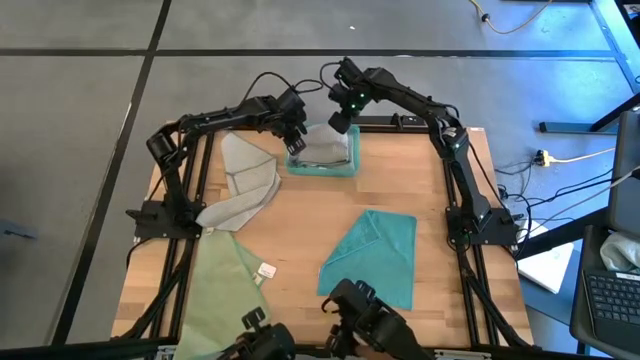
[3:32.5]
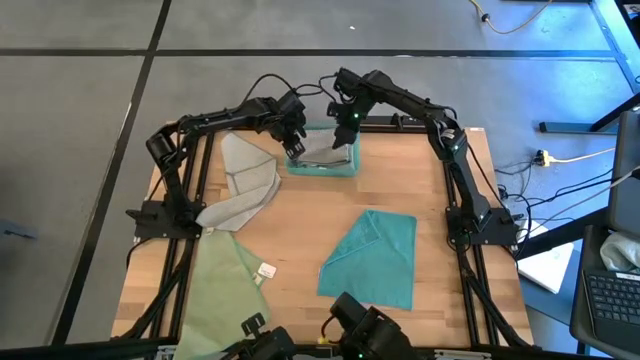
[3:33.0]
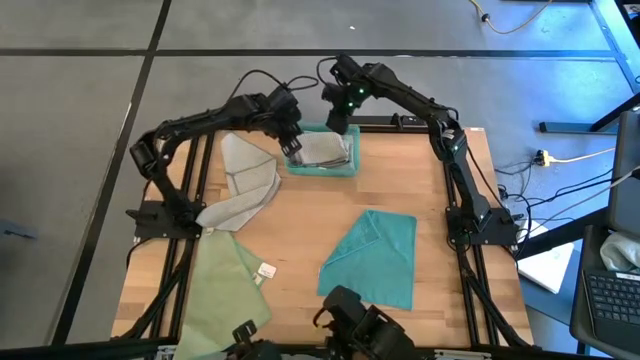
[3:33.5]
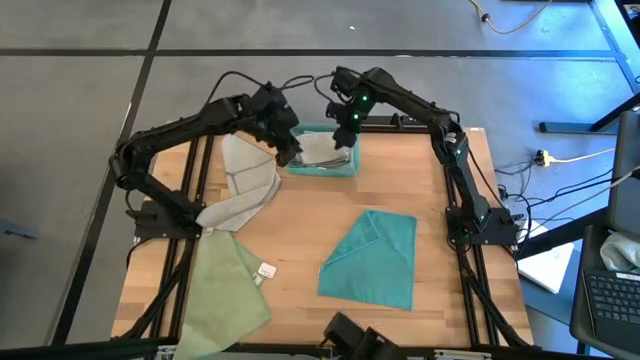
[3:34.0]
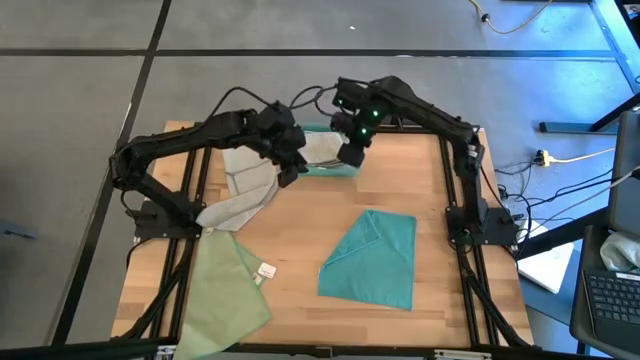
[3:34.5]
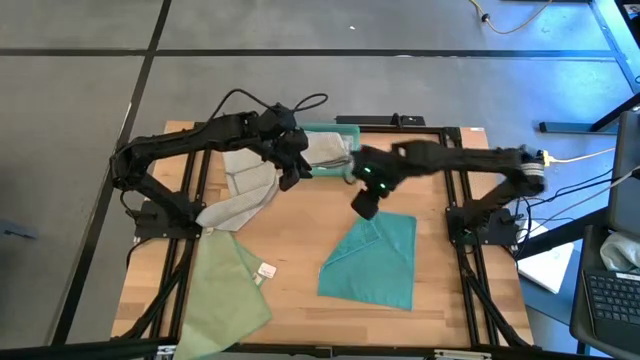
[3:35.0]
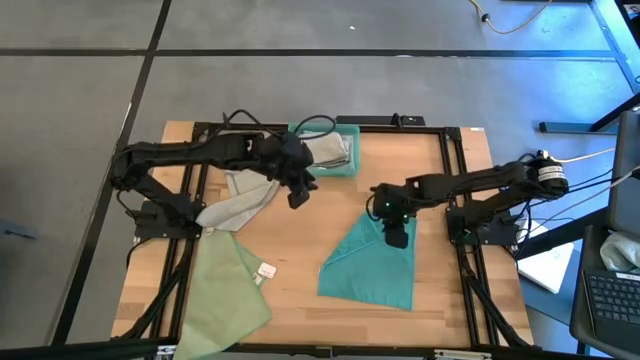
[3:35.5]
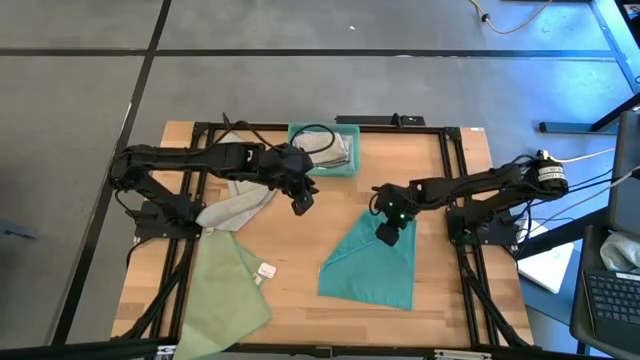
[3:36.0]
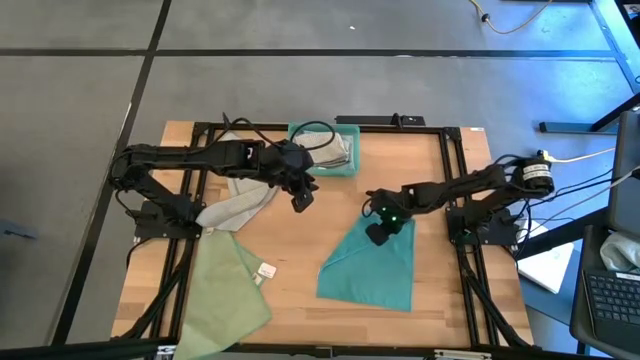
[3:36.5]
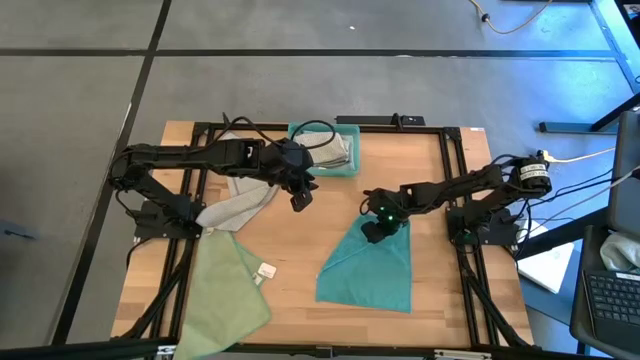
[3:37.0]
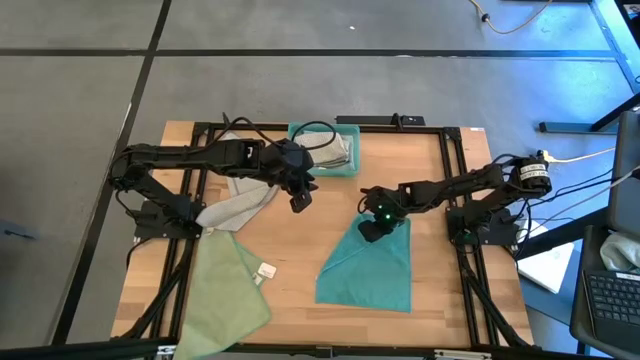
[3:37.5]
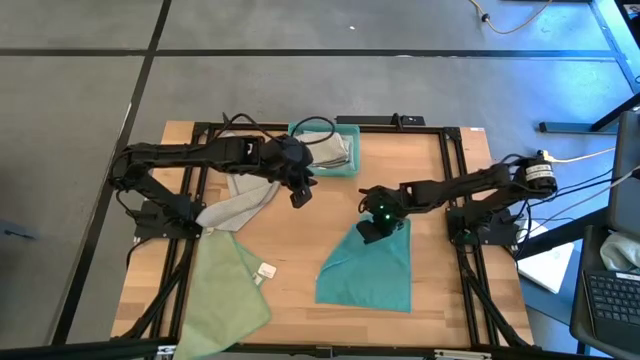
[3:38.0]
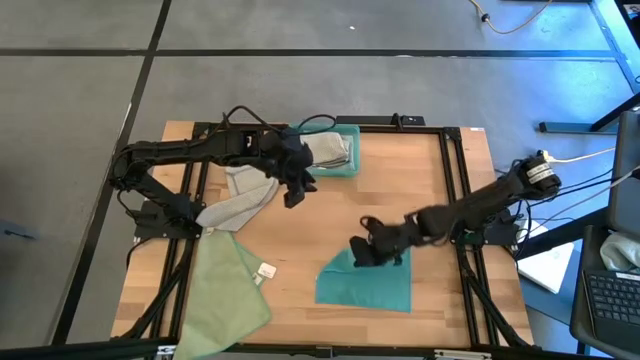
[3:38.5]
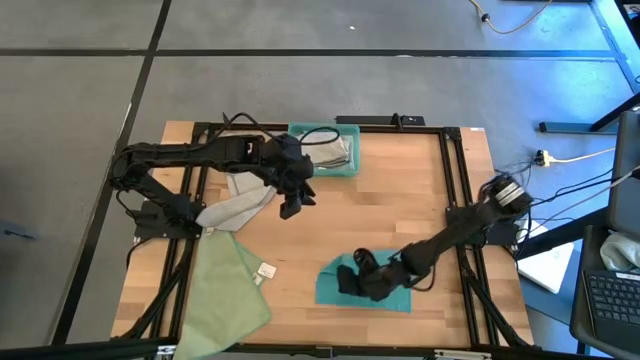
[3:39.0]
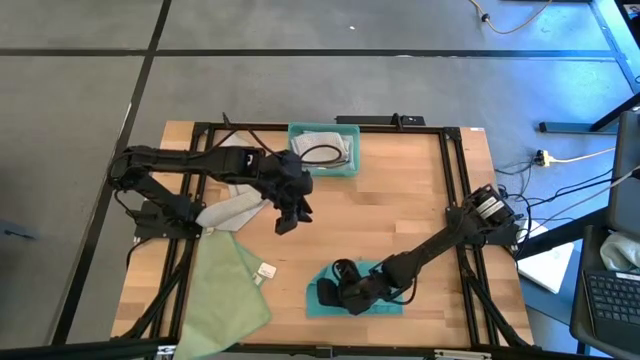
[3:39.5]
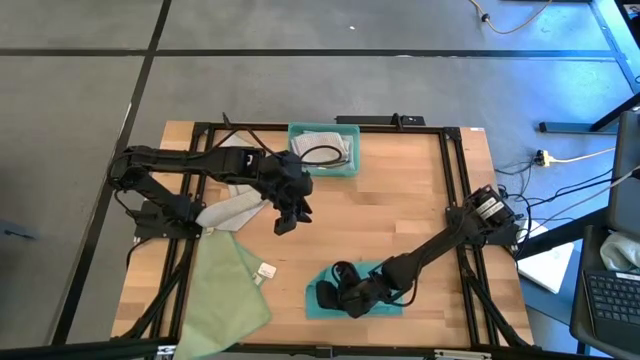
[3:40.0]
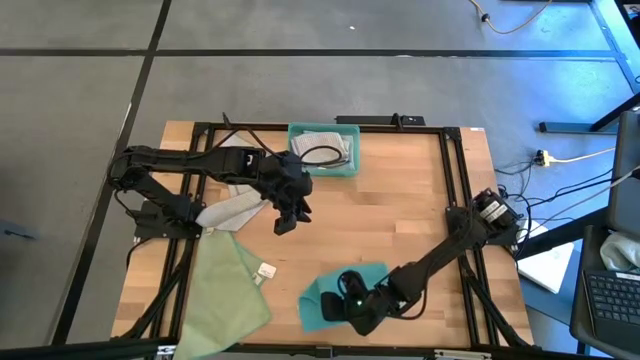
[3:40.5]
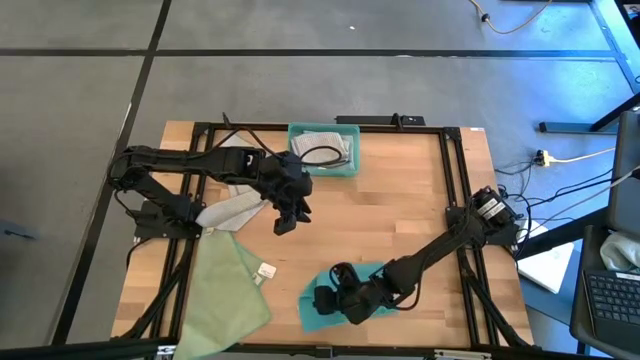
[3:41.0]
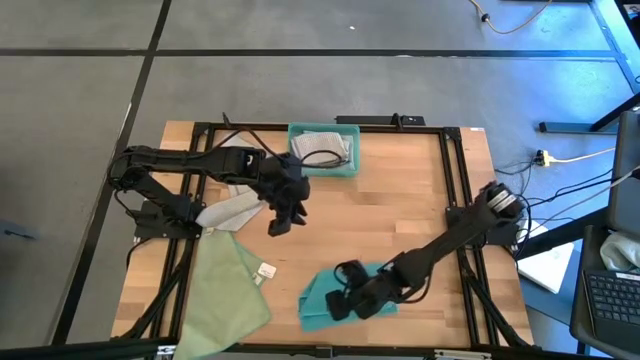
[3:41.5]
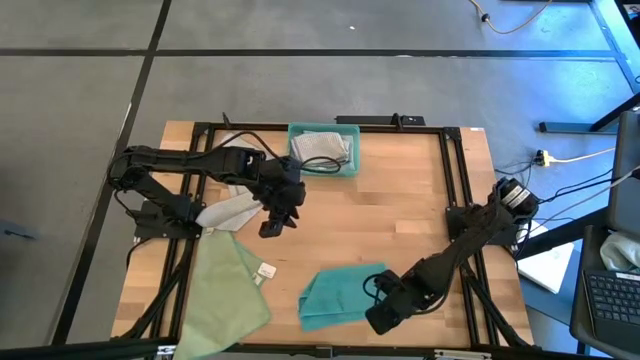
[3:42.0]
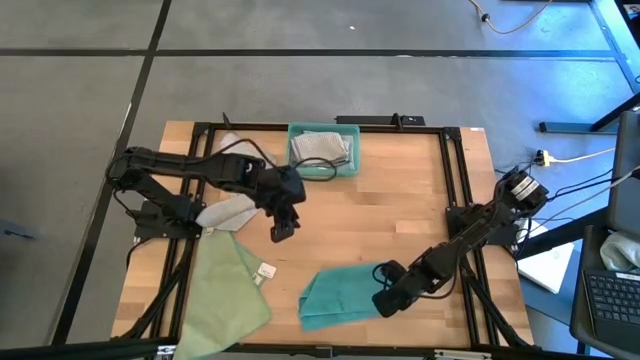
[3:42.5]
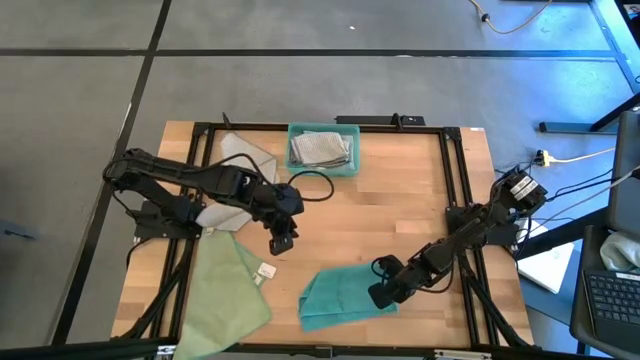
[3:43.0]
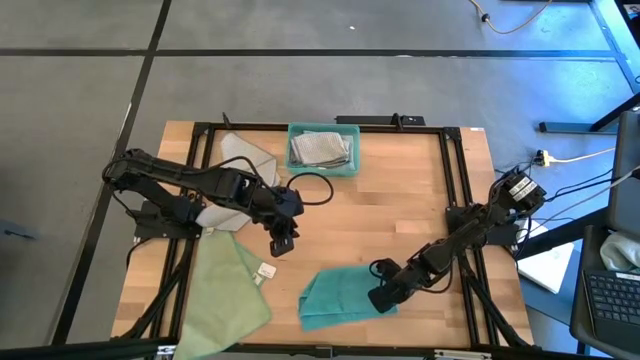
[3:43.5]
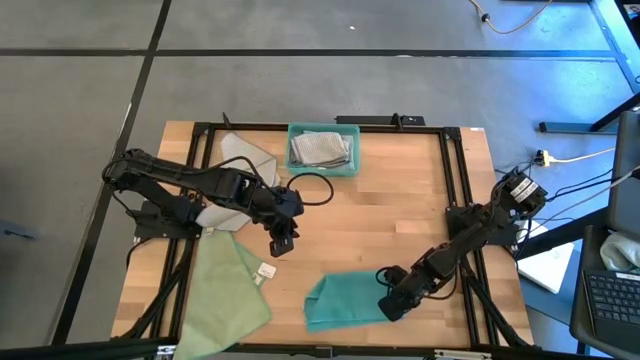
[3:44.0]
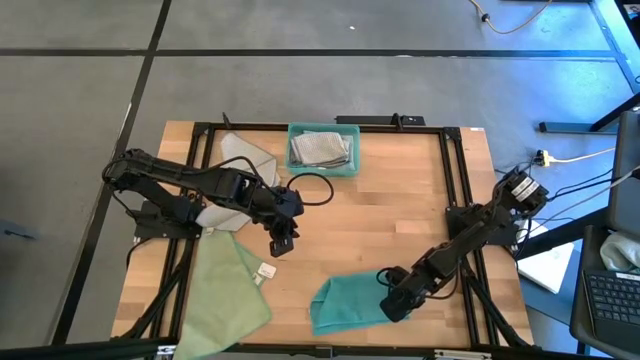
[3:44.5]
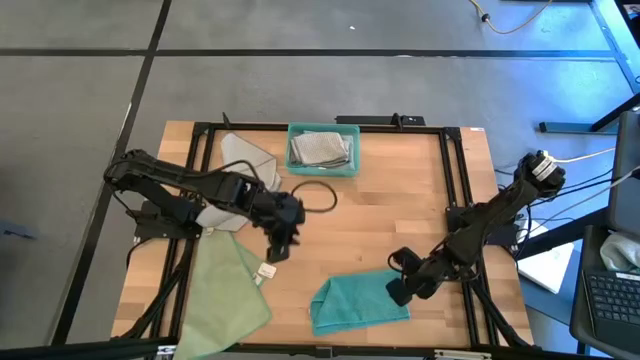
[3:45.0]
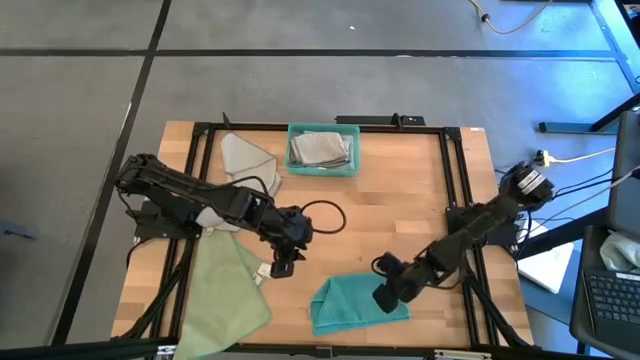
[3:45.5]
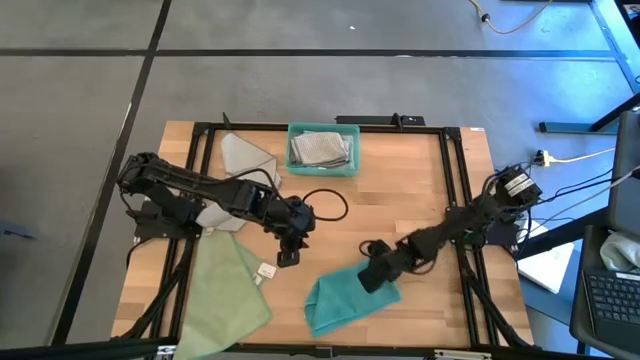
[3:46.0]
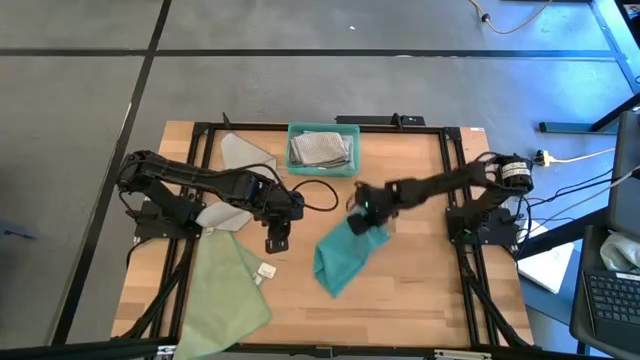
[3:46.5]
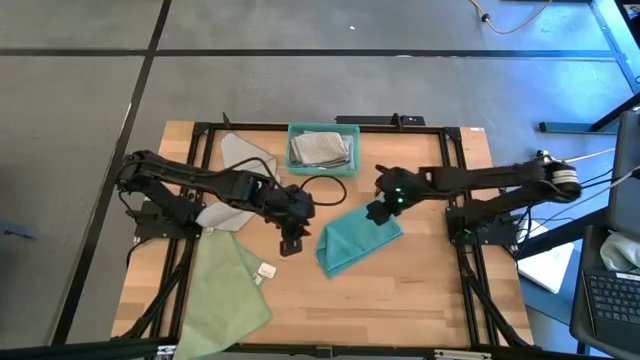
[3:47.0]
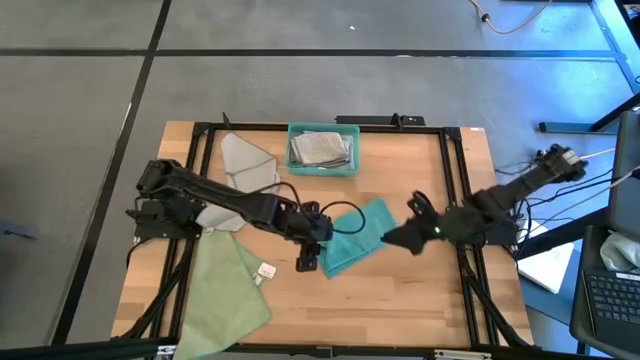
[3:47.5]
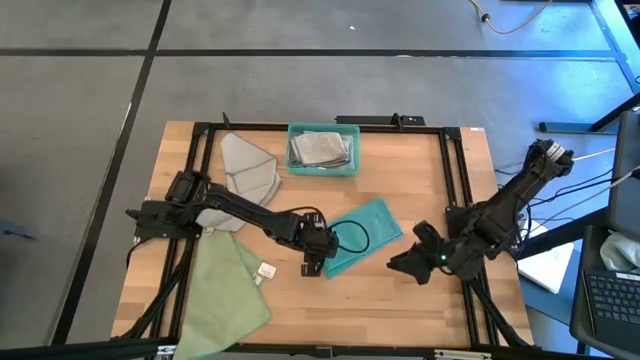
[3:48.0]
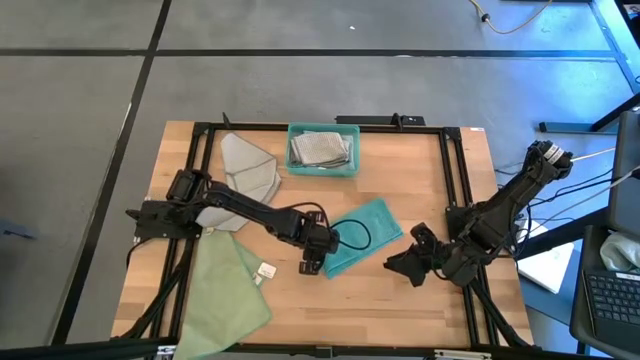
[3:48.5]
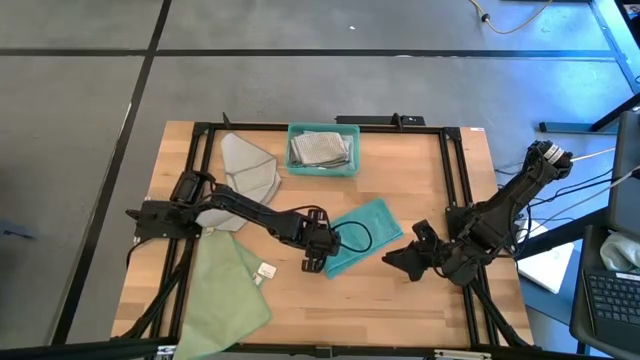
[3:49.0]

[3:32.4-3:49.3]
Task: Fold microfiber towels
Fold the blue towel

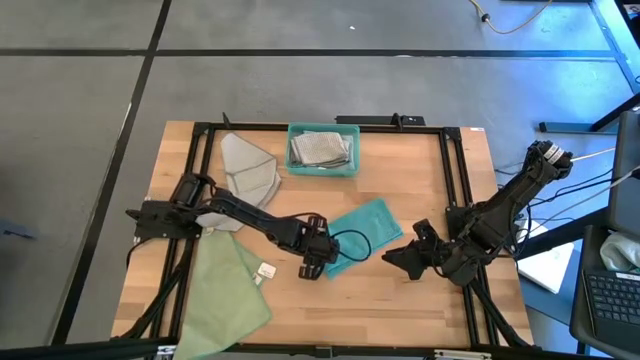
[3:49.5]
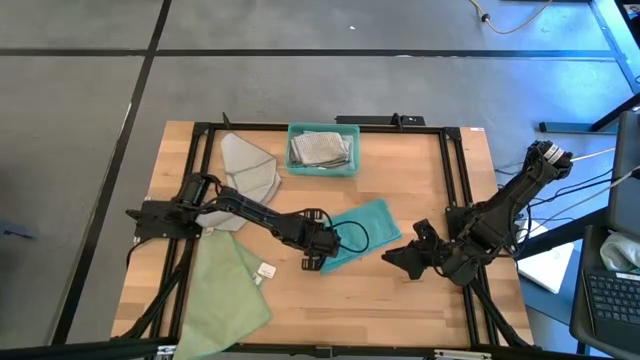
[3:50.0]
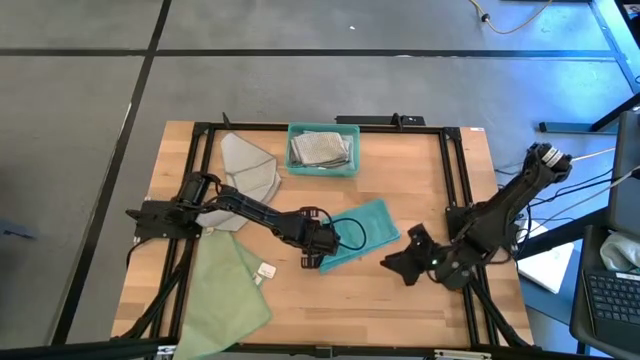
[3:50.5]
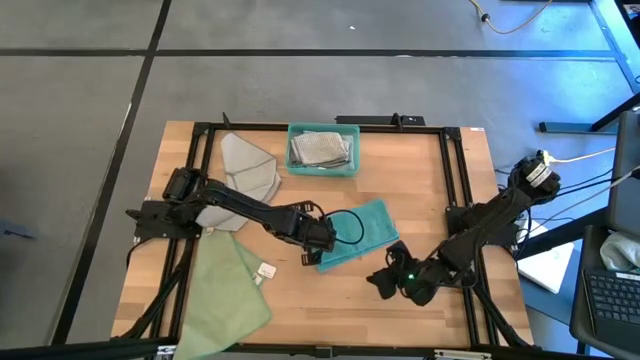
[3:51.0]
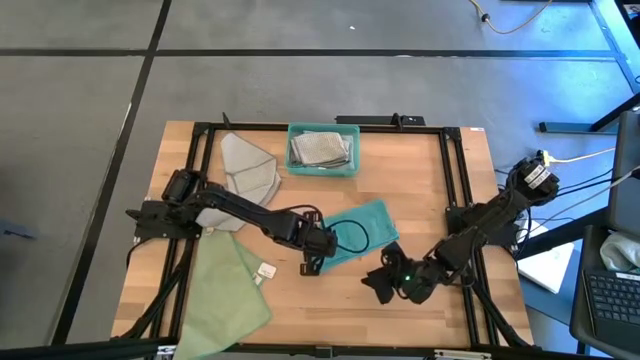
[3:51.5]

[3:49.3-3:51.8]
Fold the blue towel
